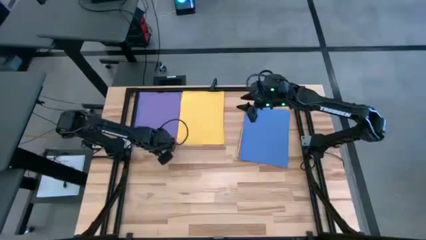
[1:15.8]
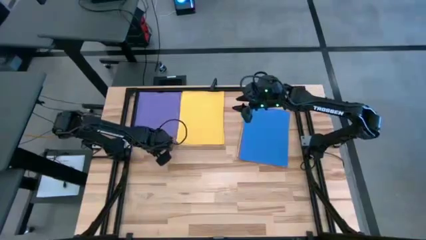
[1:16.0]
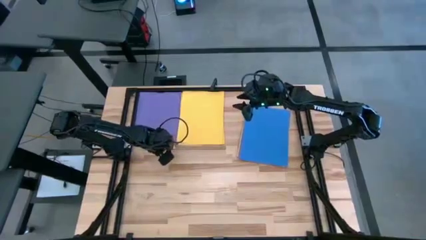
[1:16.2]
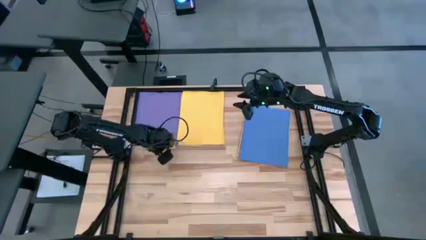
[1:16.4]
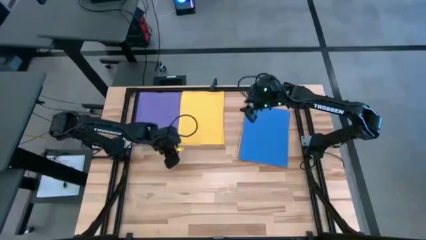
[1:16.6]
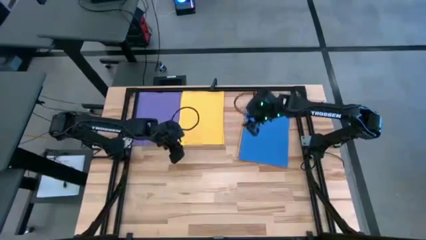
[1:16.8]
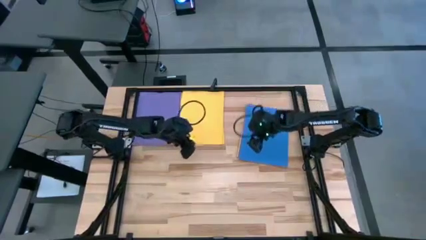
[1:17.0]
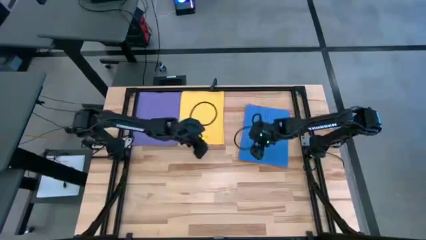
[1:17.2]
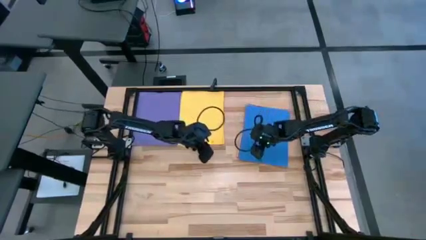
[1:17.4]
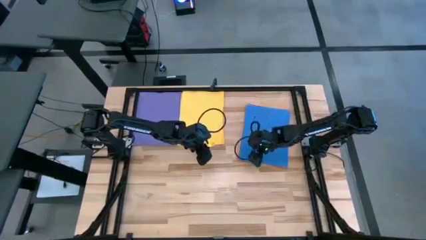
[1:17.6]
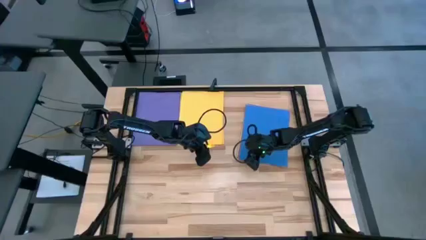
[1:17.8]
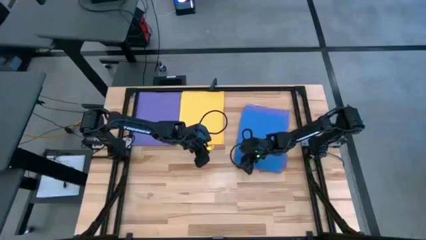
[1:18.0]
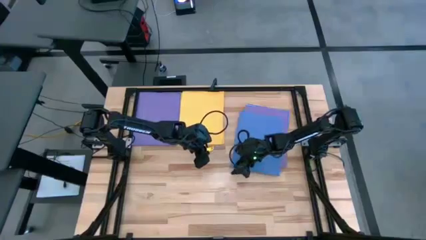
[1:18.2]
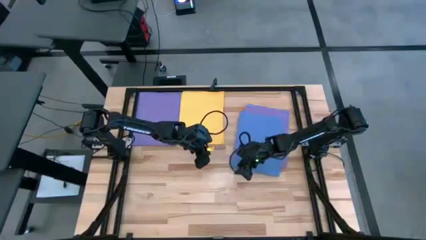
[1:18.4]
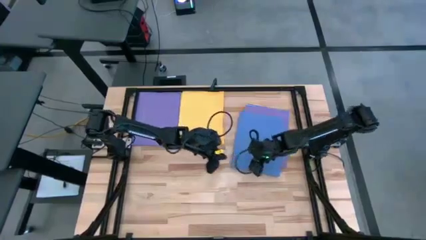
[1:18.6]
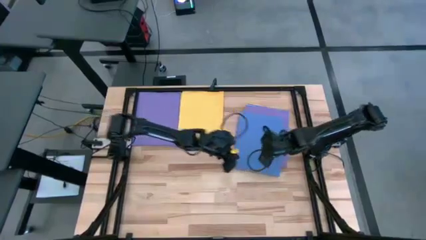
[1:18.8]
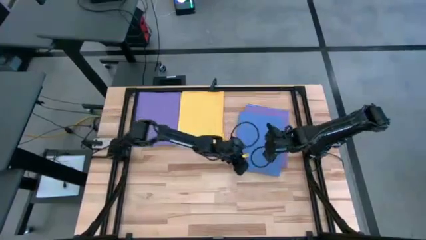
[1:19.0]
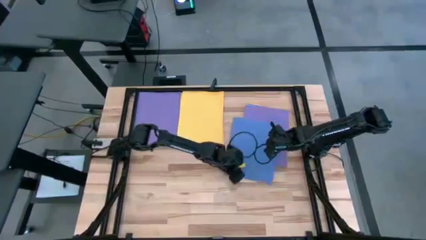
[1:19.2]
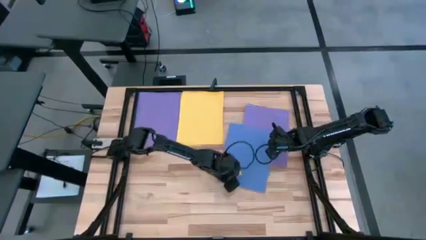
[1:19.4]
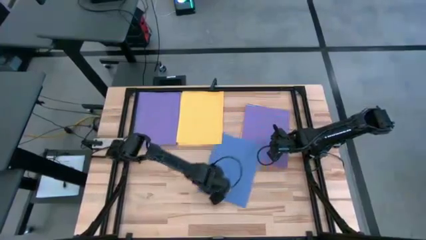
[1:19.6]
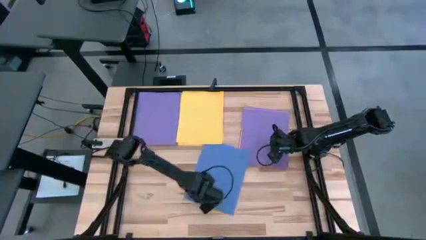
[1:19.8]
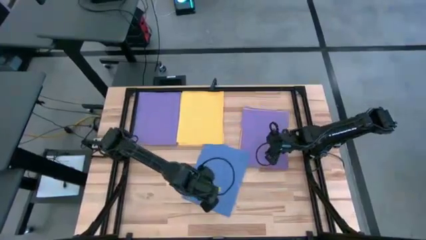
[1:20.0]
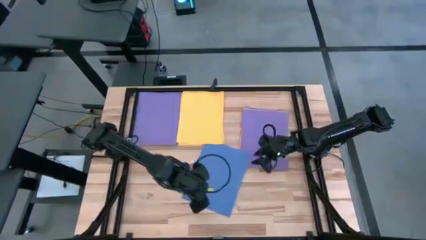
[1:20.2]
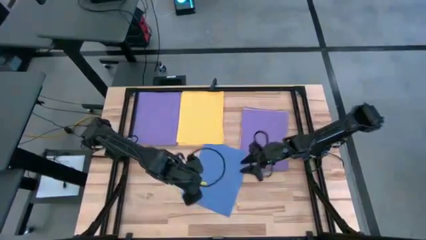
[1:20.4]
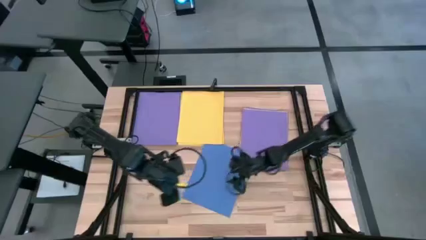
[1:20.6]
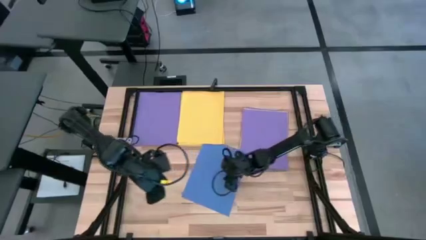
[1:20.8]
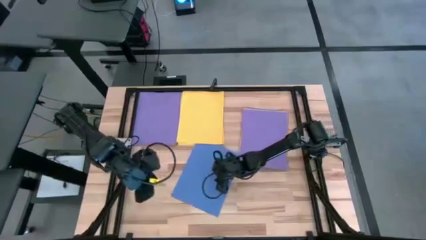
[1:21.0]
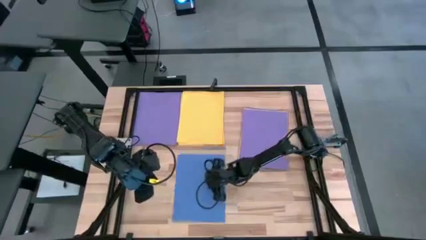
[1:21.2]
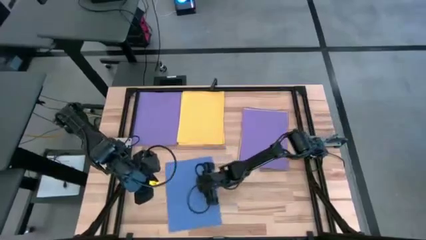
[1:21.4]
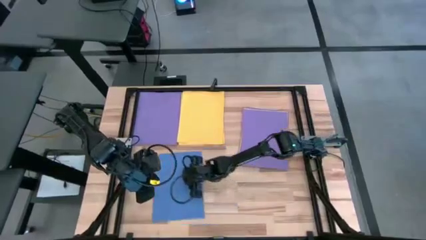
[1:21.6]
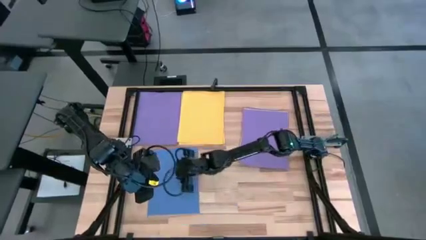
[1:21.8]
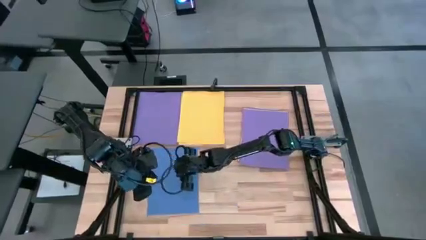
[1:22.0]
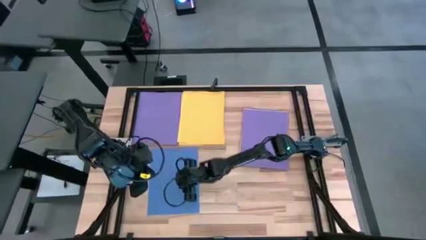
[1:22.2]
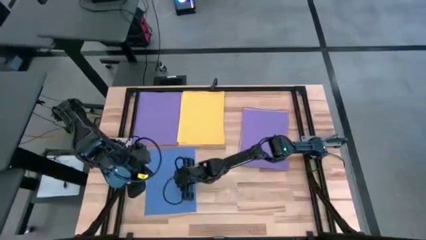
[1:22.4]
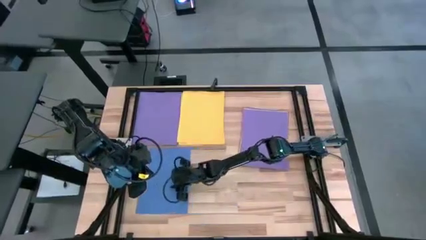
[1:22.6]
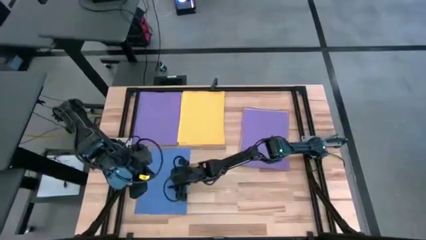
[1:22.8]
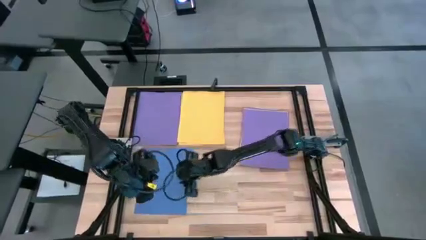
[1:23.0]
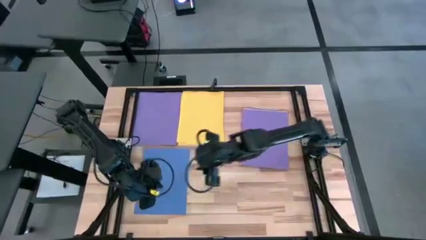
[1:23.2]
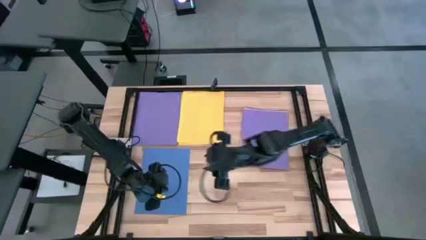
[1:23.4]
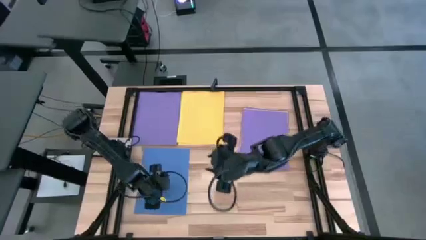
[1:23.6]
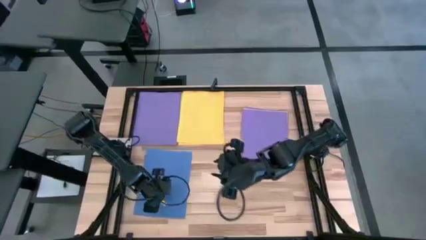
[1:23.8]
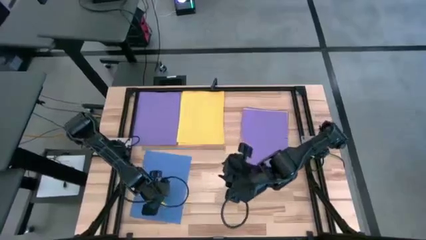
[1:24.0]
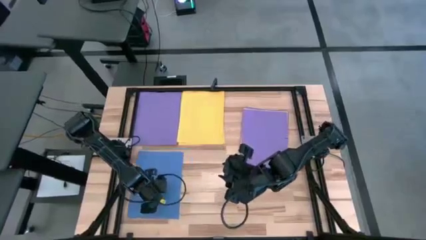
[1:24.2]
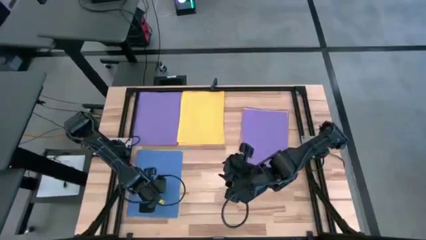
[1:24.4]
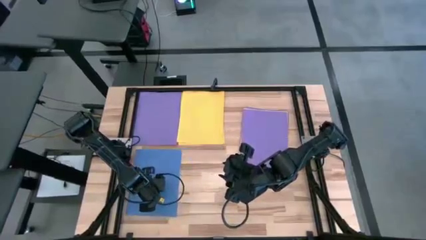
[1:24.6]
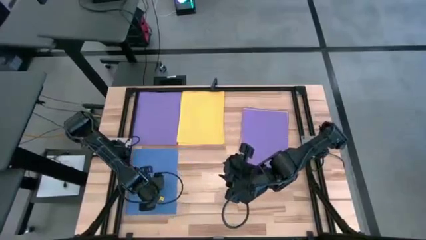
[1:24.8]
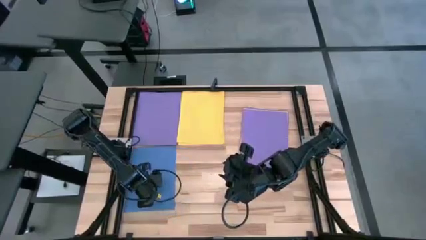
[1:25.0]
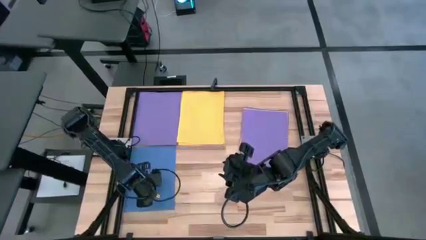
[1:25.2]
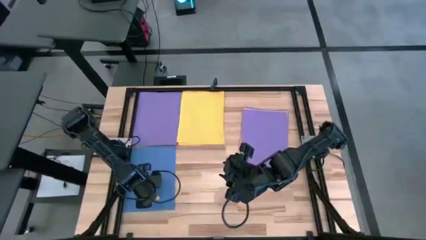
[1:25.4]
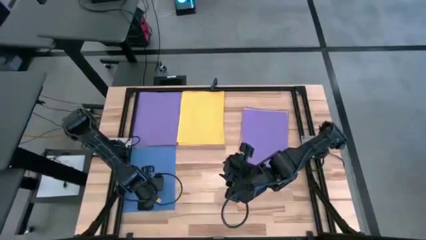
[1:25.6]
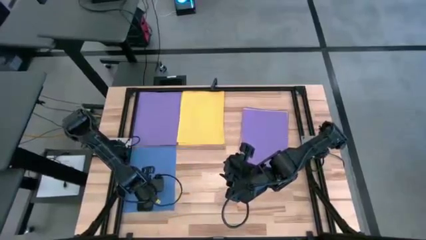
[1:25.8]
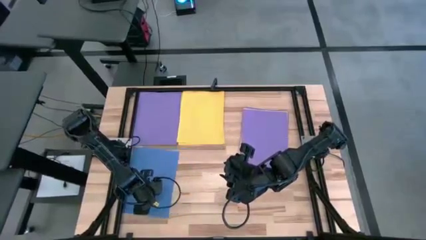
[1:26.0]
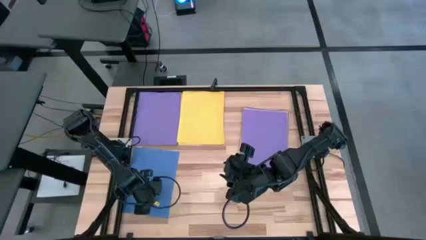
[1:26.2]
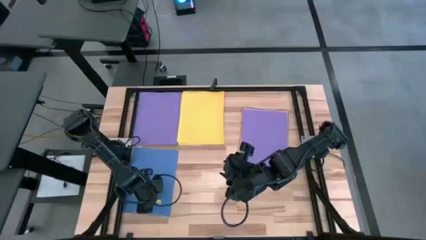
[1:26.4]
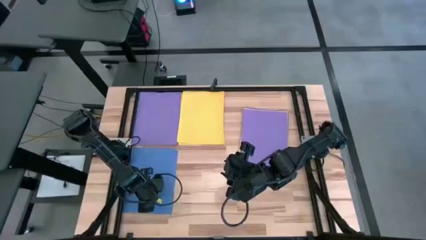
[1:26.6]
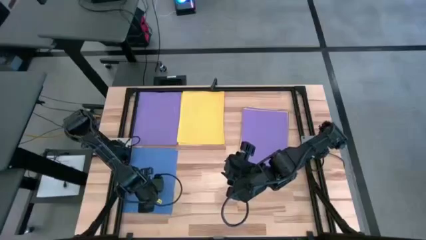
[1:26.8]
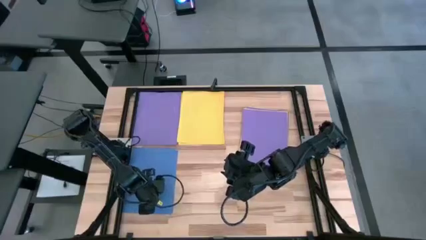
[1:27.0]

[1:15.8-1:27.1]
Task: Organize paper
Move the blue paper to the middle left of the table

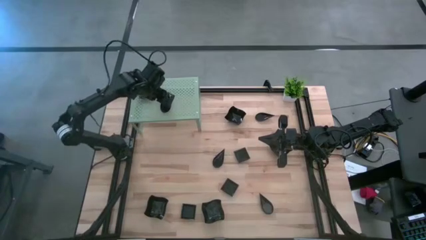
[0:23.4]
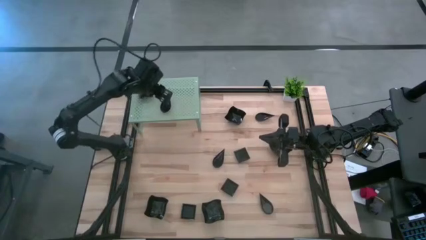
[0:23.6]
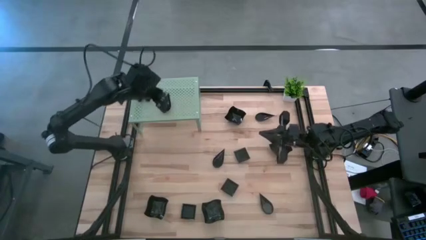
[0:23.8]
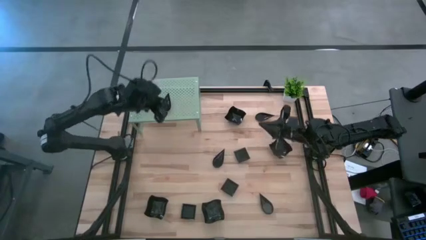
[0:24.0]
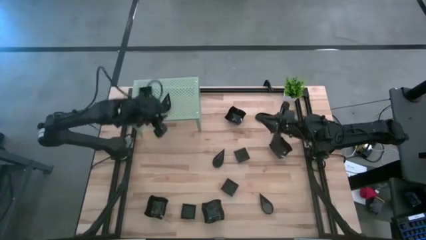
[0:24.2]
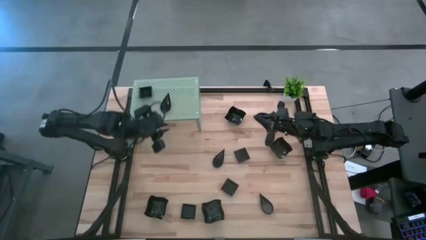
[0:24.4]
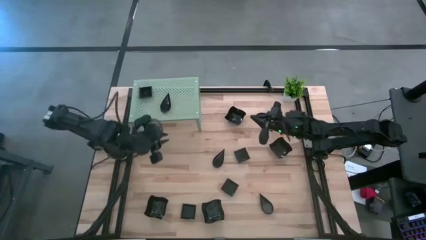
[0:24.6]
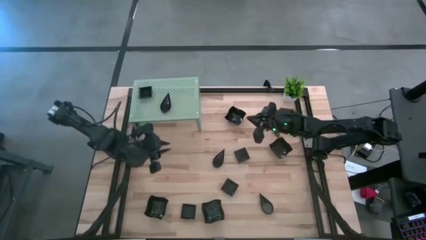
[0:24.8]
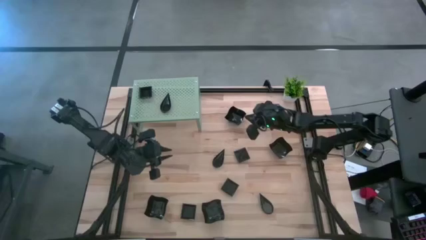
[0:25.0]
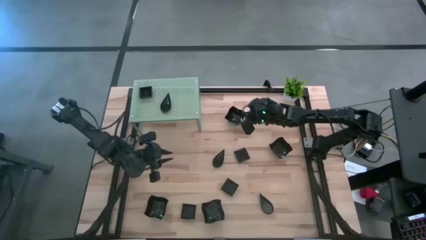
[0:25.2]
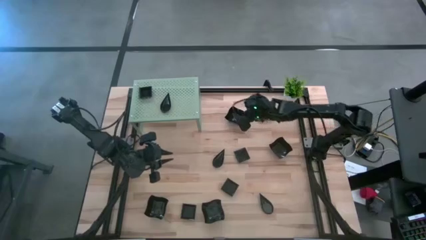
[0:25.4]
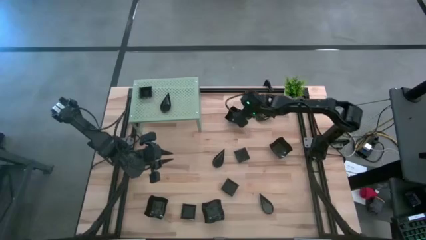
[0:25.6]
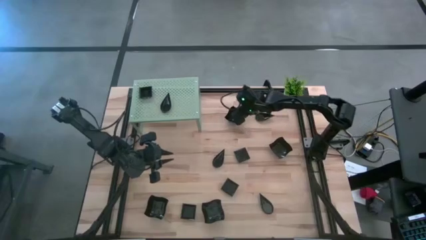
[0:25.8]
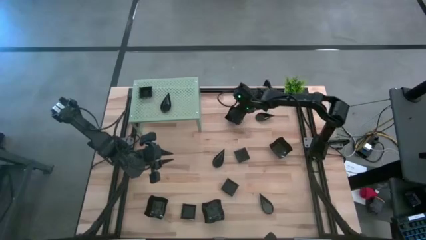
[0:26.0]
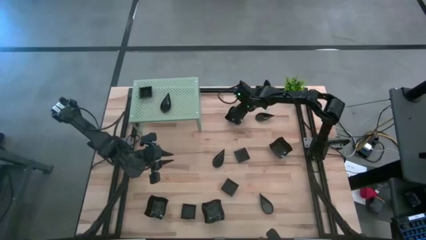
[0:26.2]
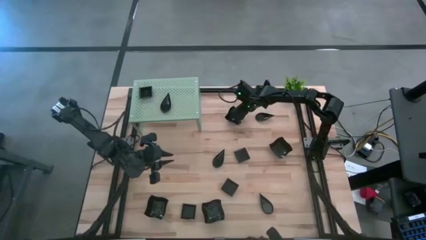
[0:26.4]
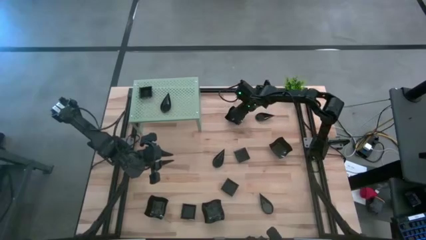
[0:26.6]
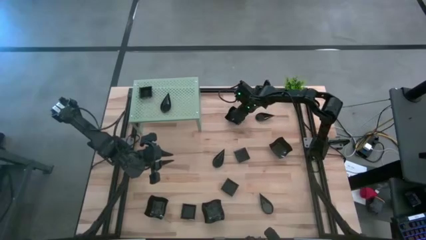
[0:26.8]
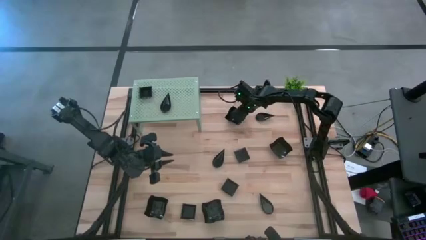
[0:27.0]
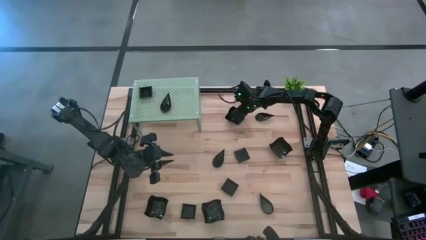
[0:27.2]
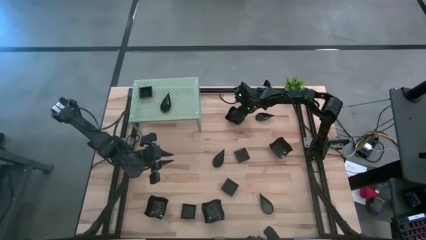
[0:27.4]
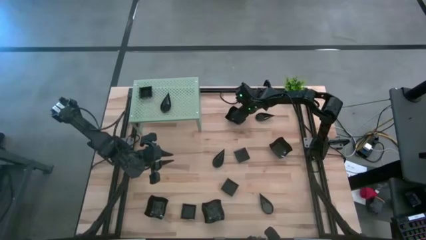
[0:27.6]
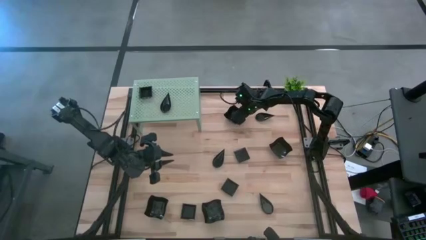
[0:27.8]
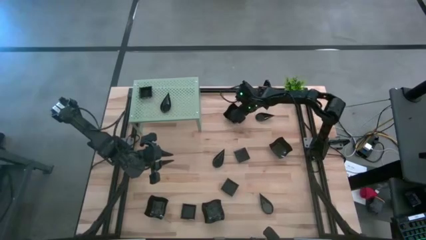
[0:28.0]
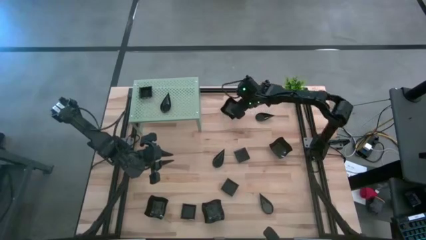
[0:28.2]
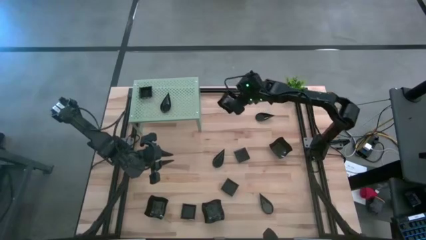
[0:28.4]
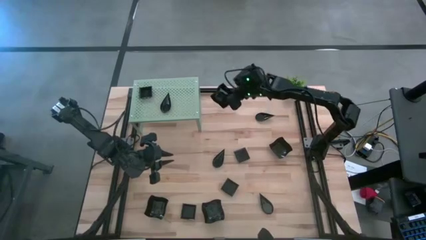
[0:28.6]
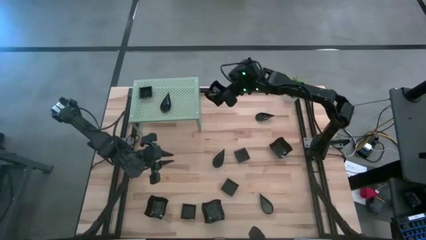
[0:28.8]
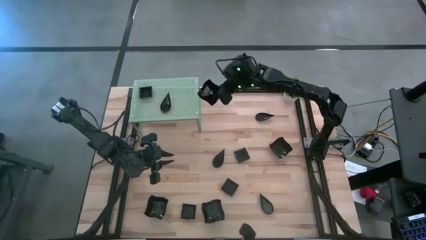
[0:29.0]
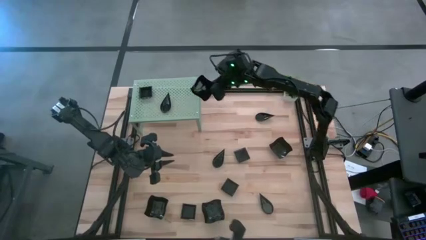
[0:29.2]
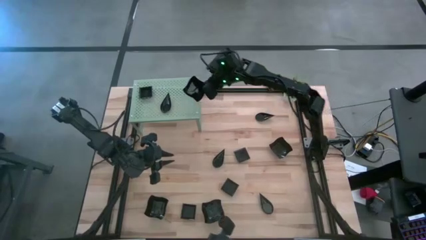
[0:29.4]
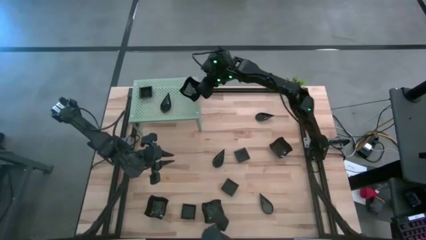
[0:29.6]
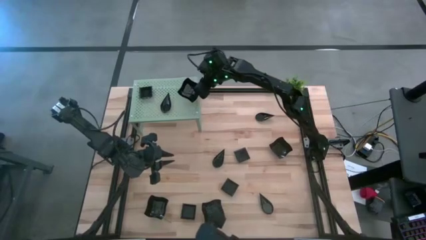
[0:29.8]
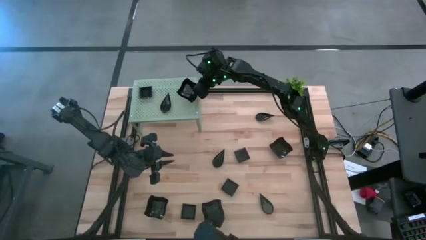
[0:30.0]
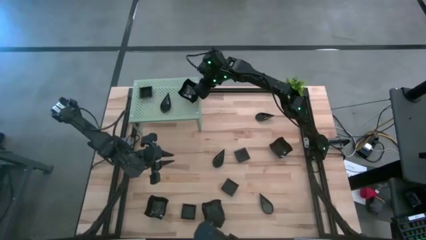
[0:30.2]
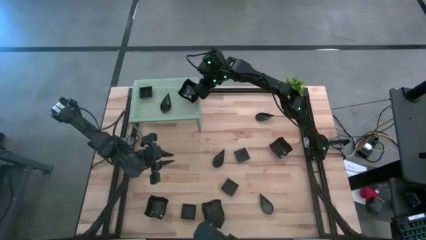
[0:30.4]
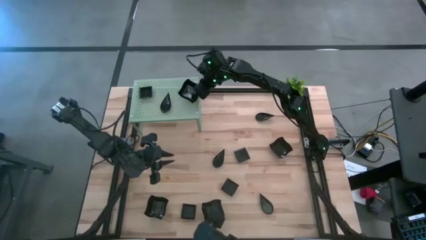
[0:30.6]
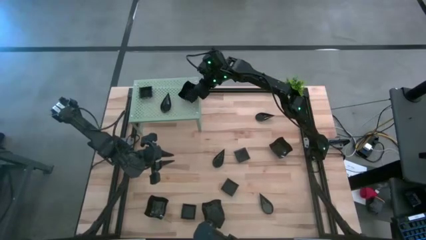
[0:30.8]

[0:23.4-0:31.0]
Task: Pick & Place Mini shaped plates
Put the black distorted square plate on the shelf
